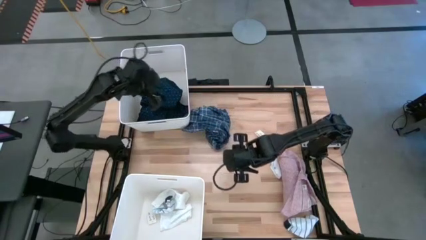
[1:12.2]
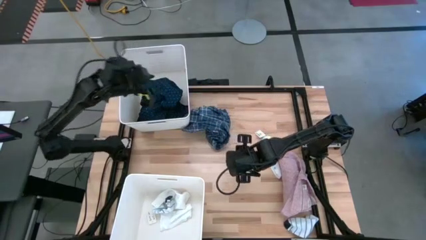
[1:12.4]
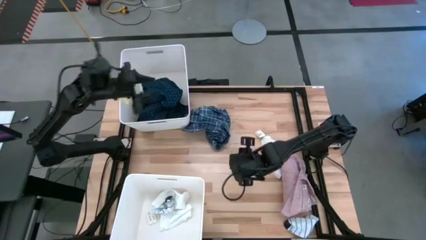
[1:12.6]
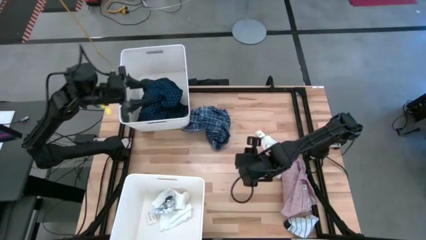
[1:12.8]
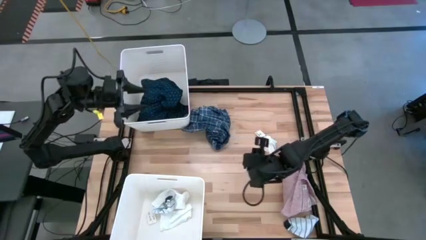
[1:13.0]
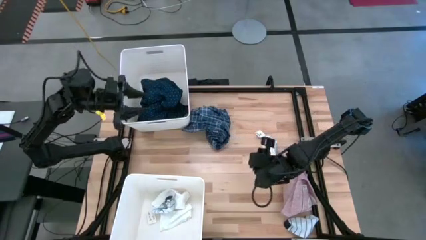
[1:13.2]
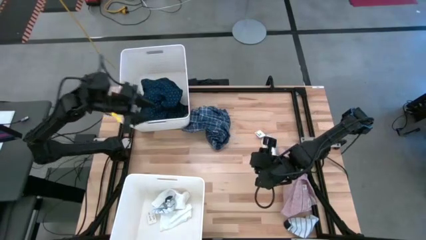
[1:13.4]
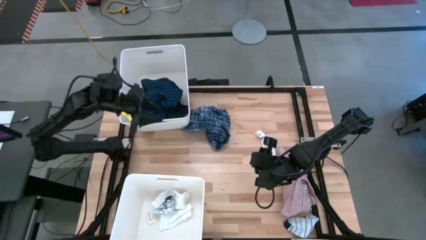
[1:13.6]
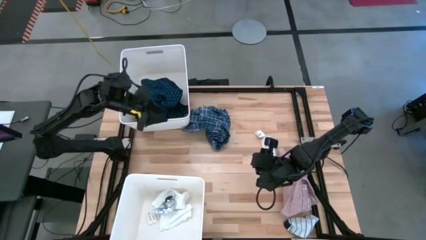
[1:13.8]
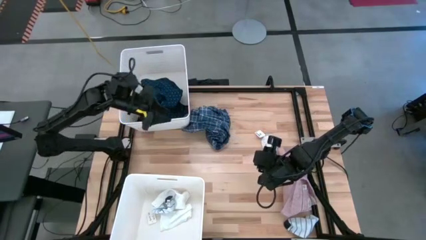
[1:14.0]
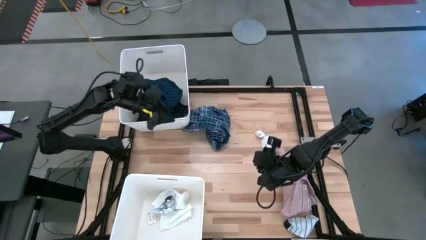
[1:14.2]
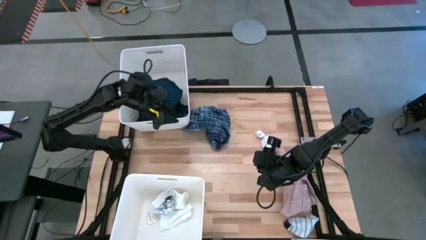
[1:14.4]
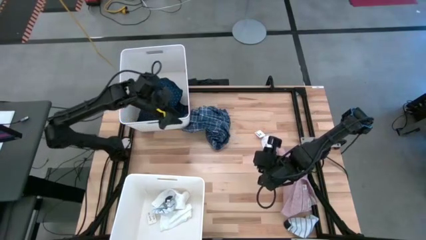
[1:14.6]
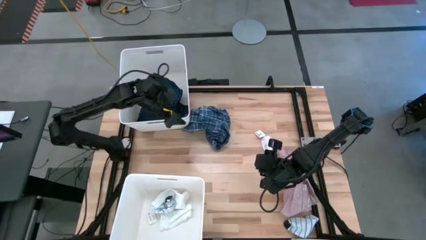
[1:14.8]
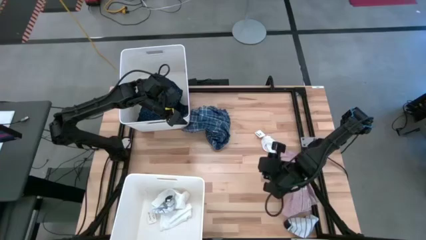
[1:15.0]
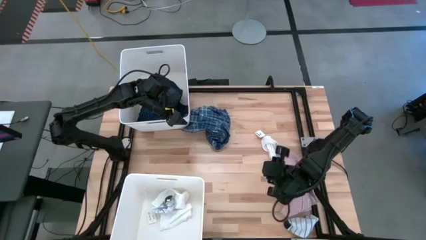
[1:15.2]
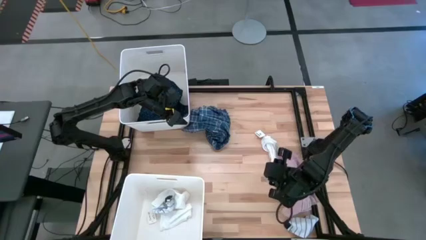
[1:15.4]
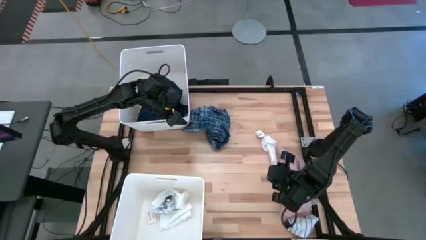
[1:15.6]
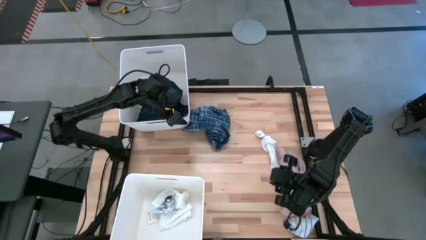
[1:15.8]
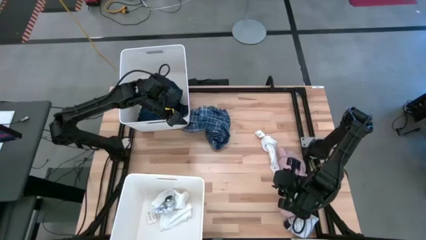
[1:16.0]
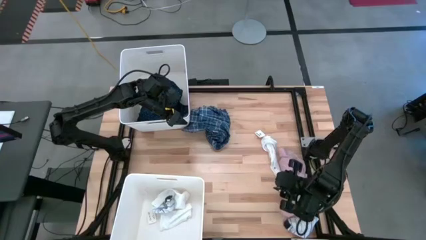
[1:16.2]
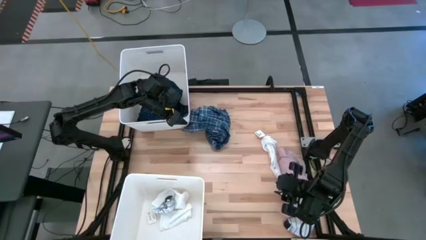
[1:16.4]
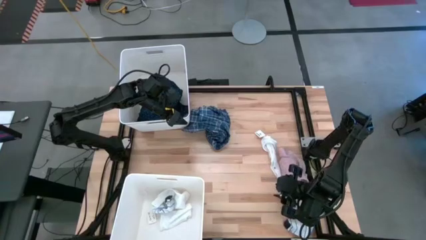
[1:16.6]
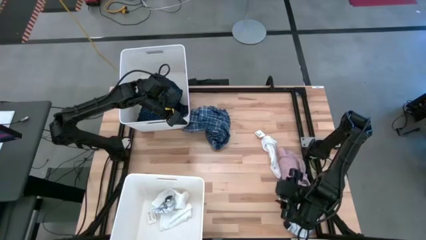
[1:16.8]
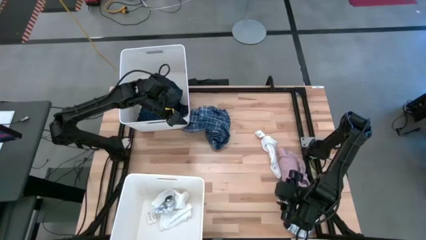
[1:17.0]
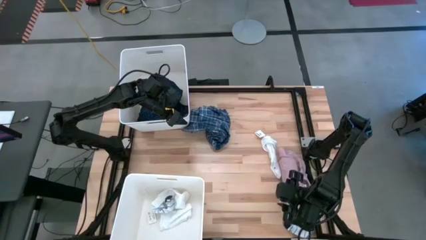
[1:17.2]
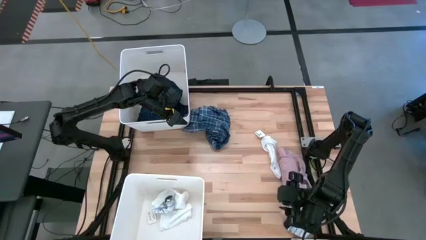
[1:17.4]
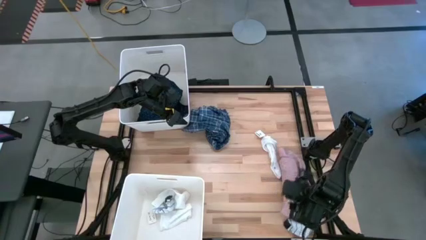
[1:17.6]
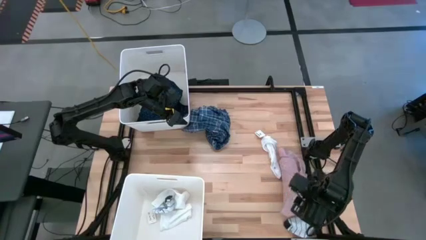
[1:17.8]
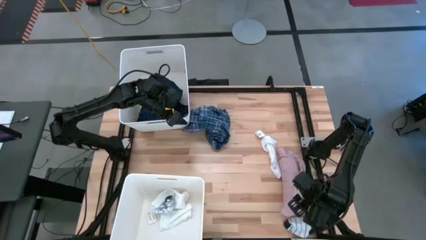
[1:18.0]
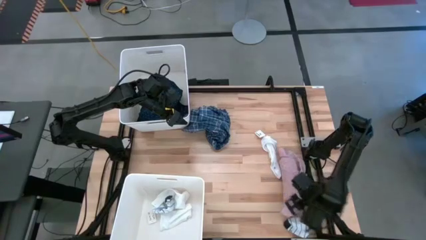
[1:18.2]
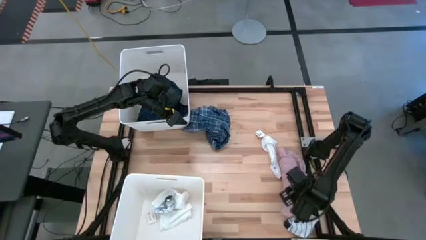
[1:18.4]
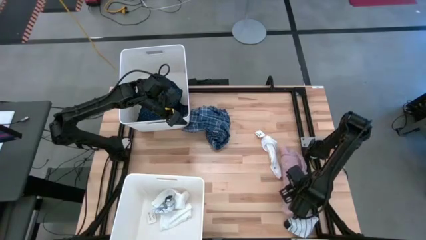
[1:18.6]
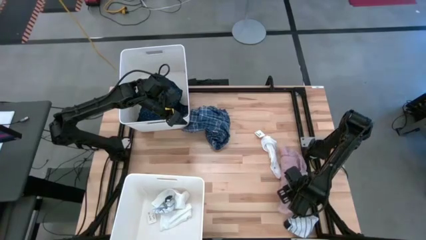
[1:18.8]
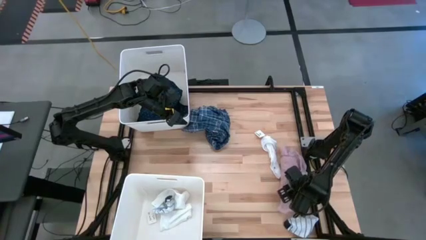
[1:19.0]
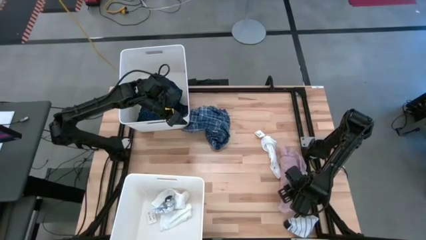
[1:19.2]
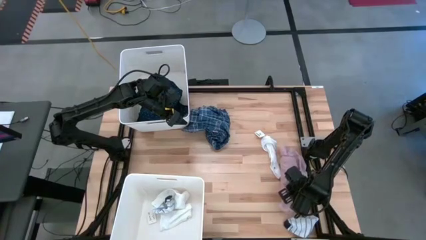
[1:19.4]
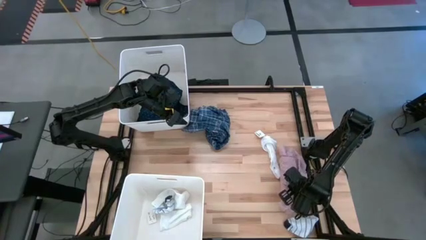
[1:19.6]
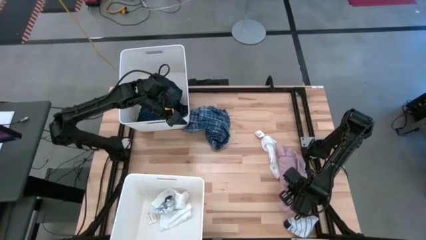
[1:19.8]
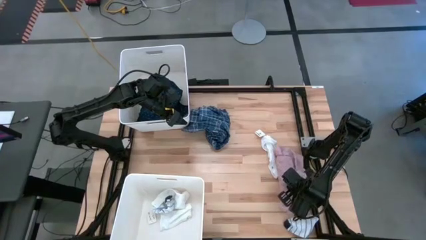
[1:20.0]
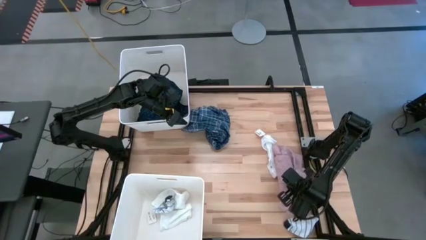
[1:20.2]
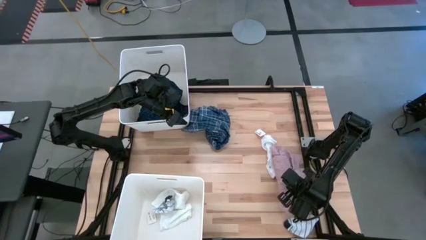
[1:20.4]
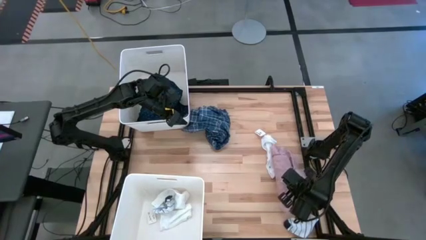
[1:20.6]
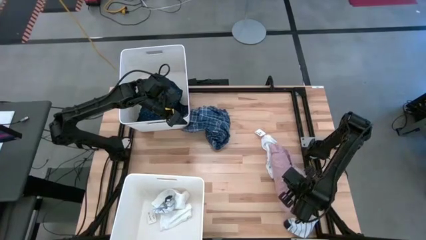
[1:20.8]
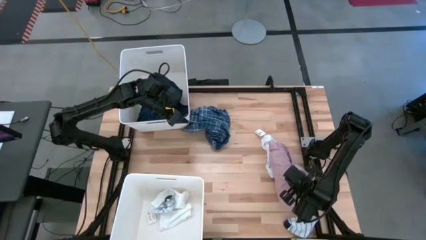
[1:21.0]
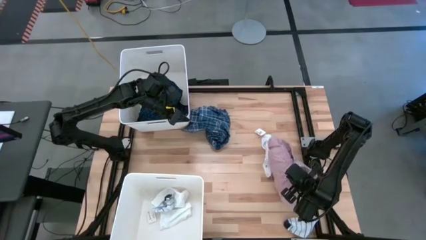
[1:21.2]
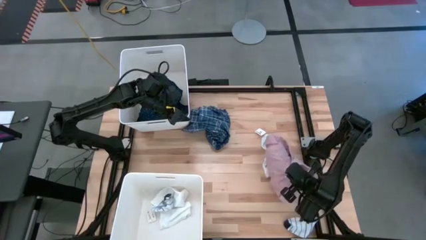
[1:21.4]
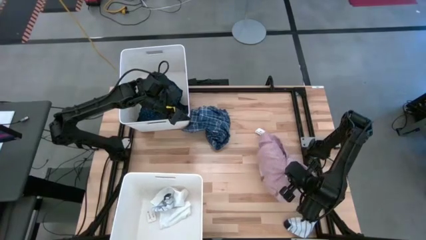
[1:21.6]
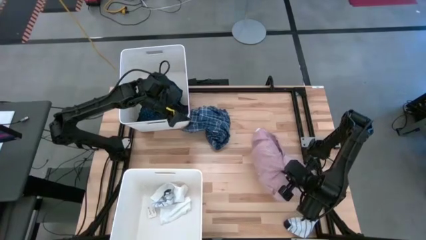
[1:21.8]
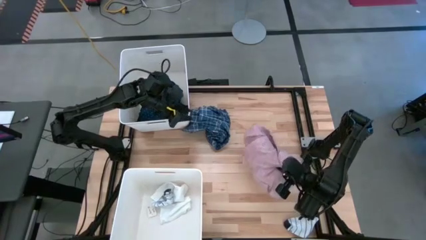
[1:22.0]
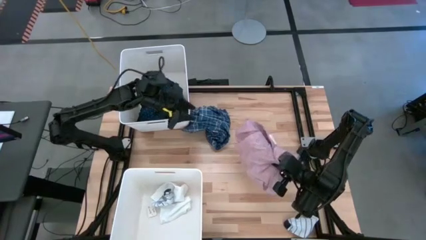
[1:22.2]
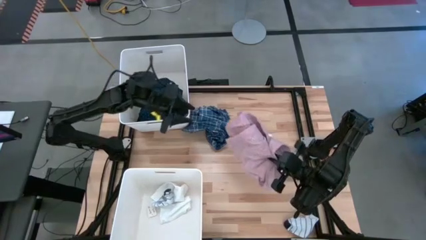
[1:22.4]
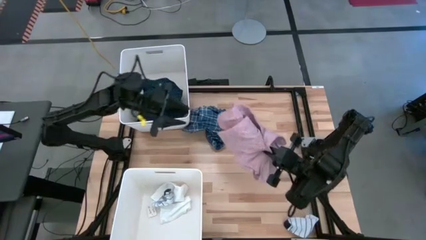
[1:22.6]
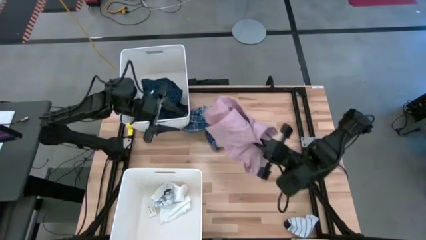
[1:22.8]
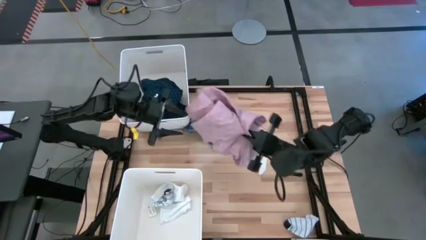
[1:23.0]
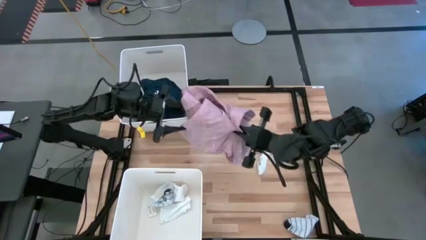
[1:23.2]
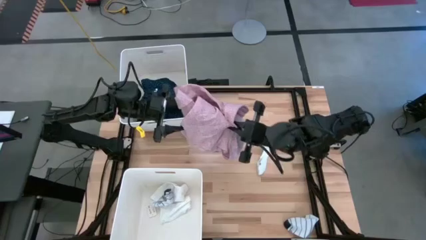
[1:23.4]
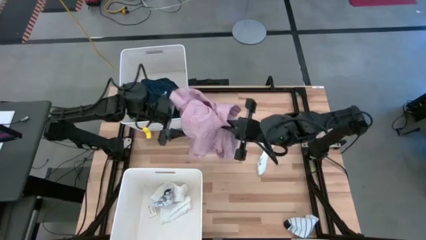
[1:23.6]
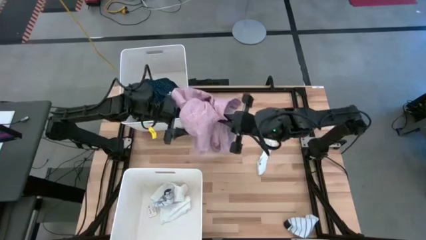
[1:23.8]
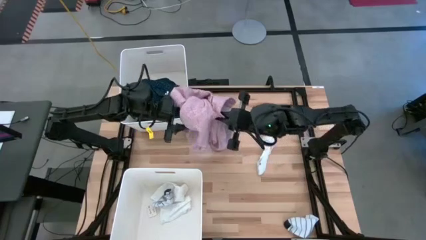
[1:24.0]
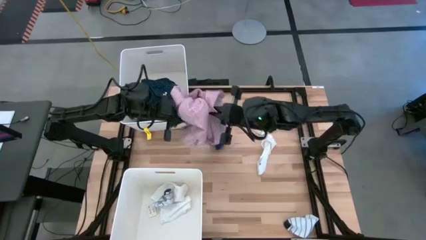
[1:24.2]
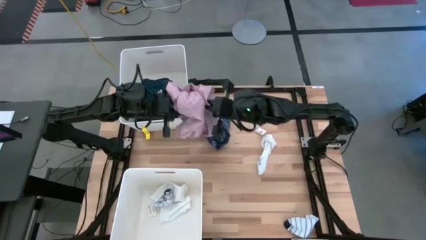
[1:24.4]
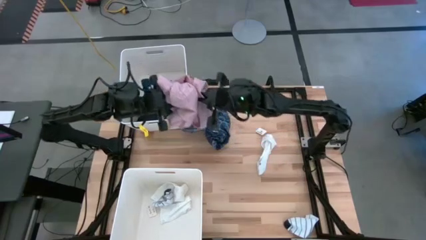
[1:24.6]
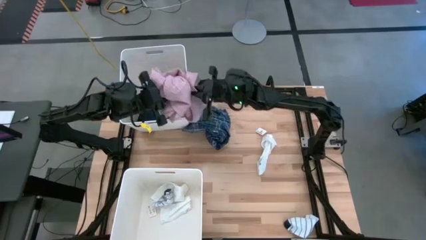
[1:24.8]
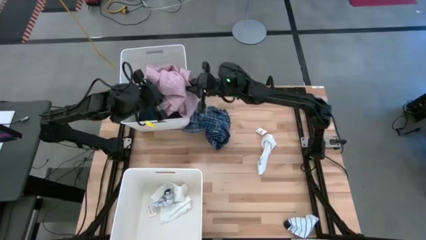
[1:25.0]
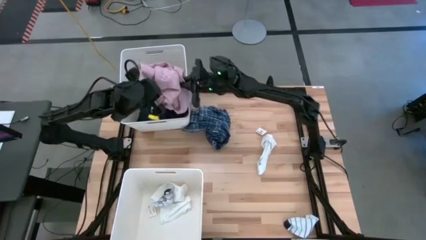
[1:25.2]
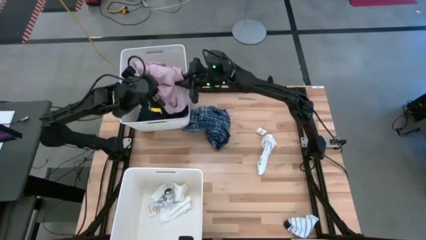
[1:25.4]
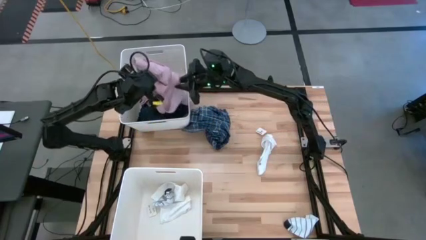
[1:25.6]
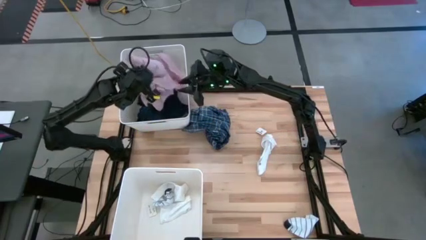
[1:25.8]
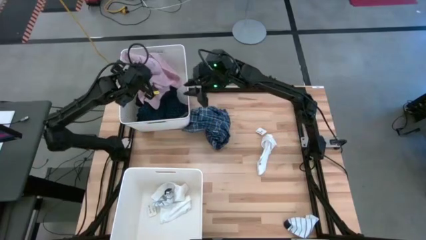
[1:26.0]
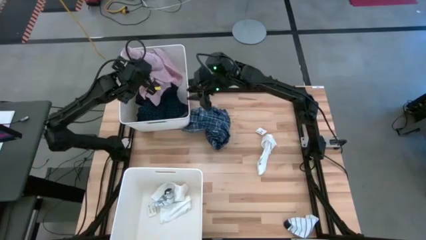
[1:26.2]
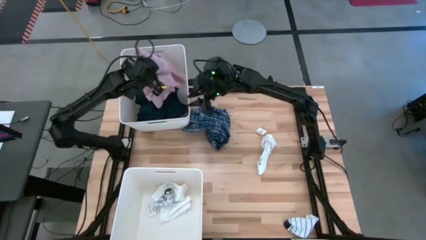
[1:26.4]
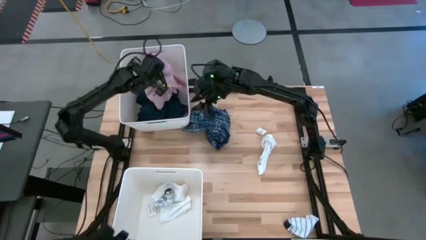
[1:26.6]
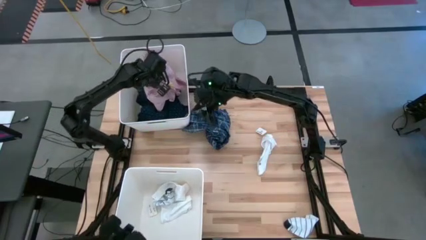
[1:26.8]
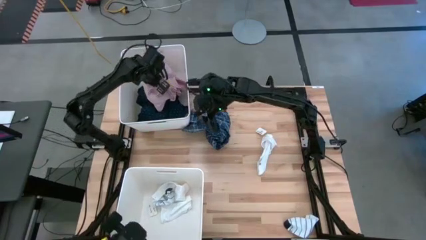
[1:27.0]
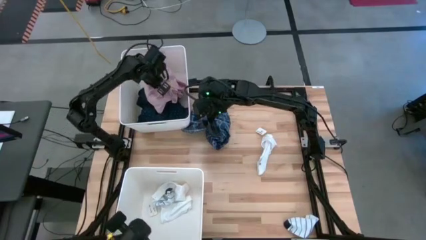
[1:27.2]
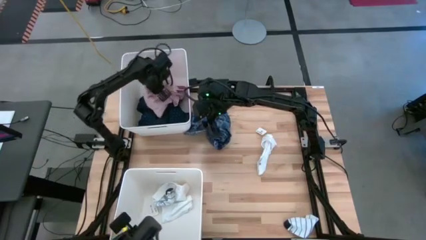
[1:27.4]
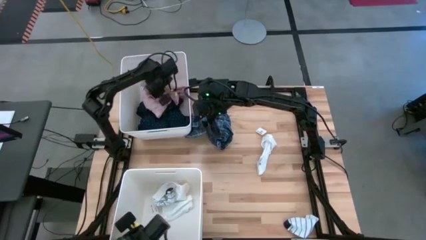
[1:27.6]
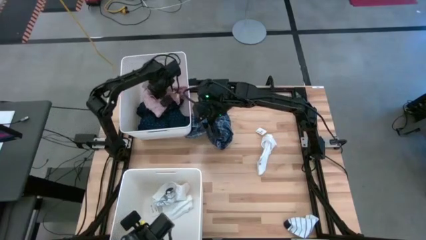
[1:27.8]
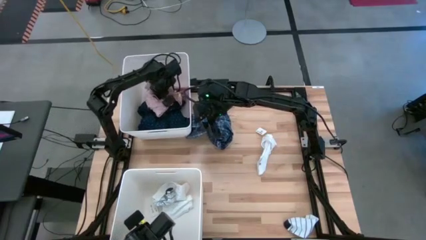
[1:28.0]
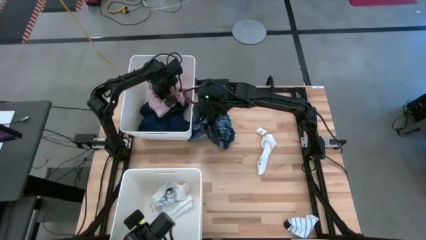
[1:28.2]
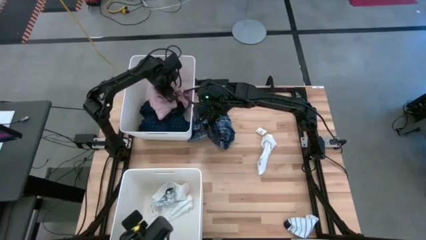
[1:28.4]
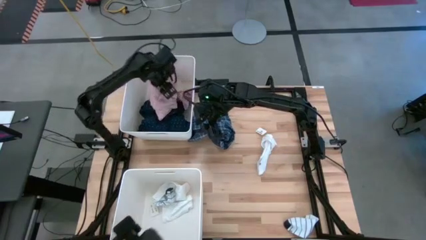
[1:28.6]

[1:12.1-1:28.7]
Task: Sort clothes
Put the pink shirt into the top white bin
